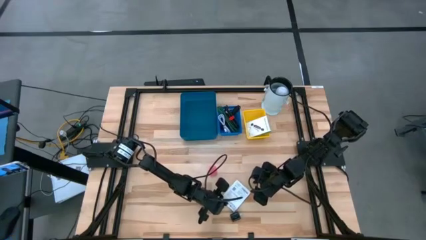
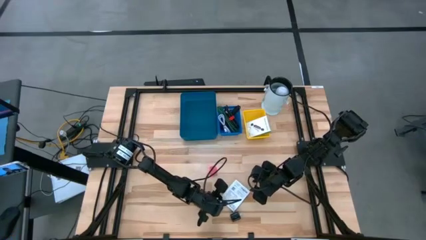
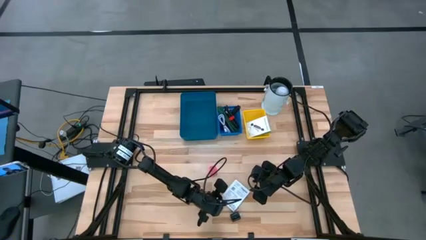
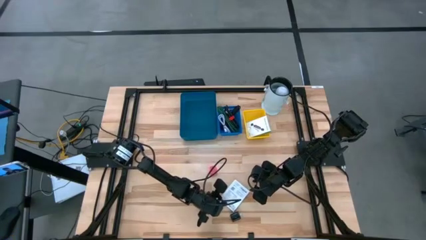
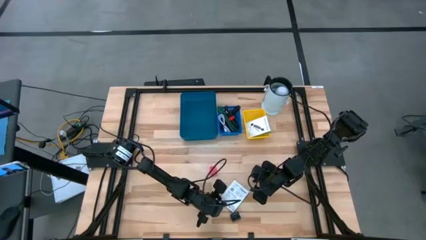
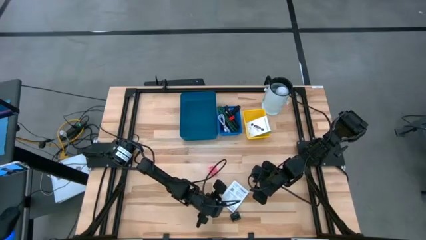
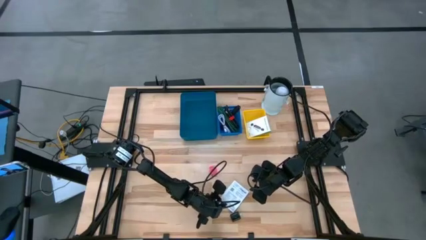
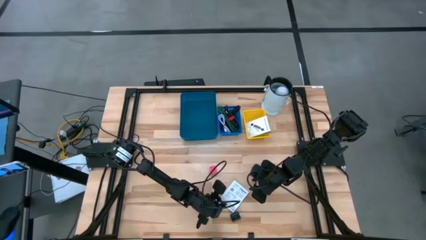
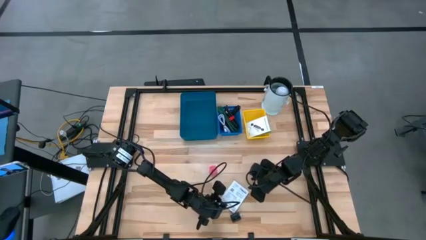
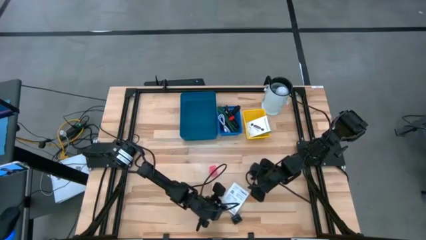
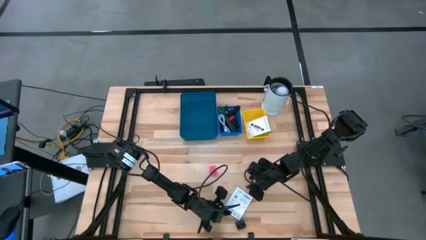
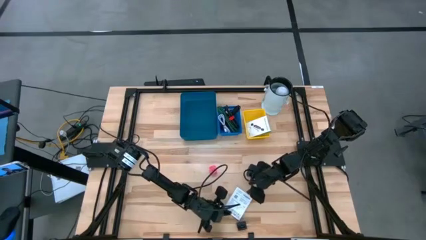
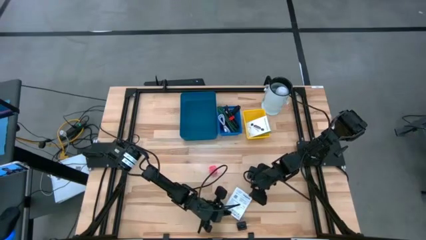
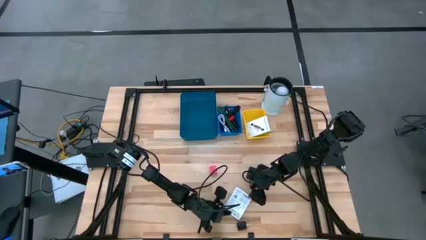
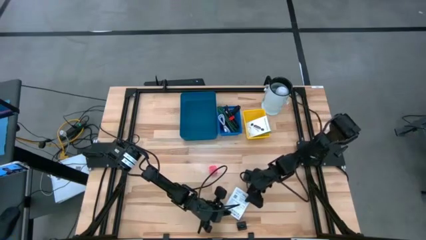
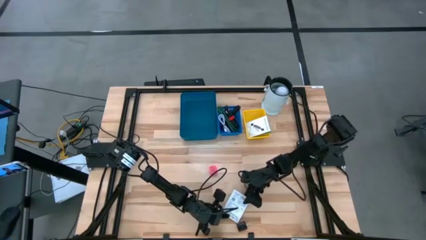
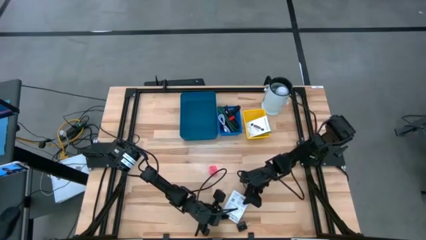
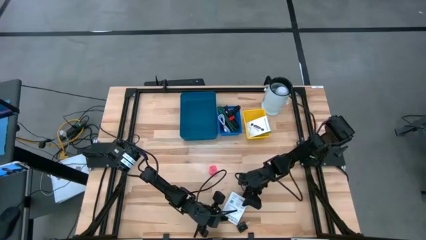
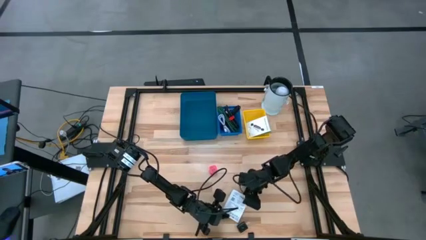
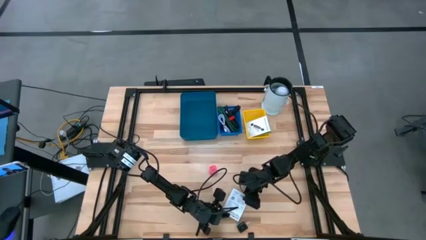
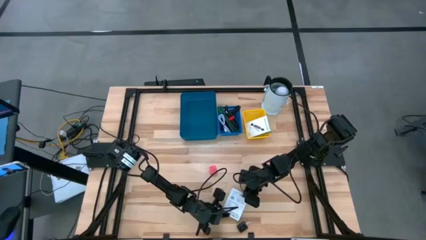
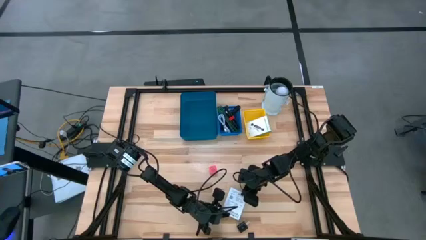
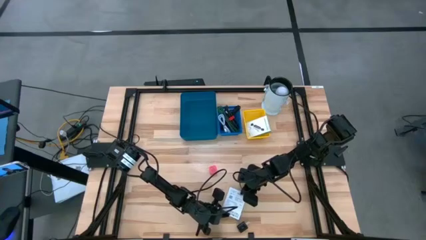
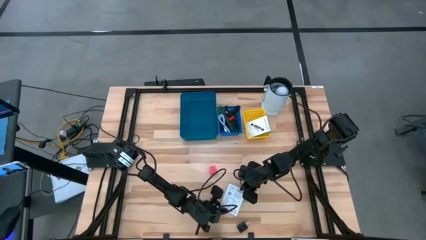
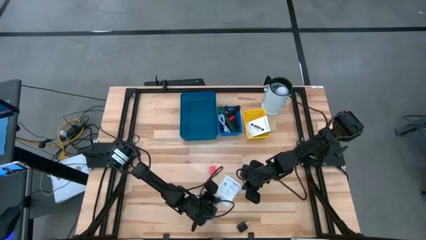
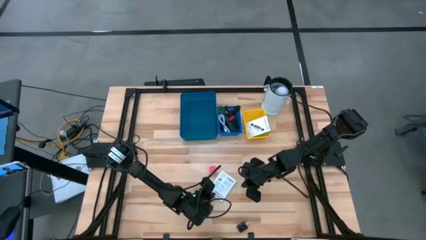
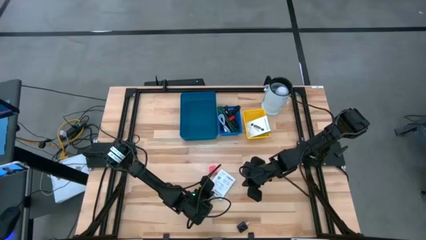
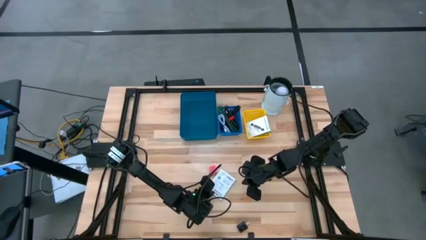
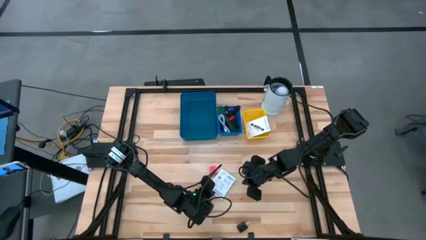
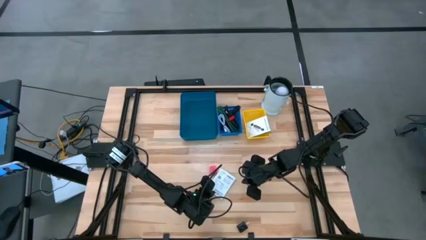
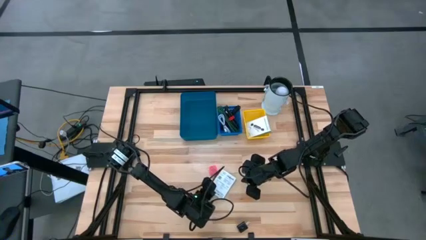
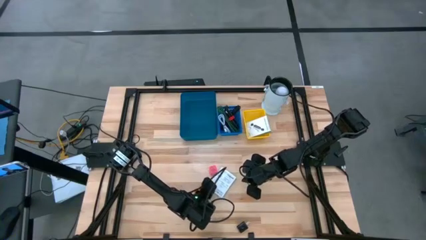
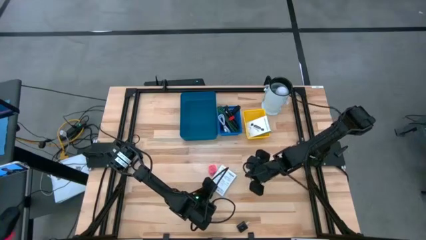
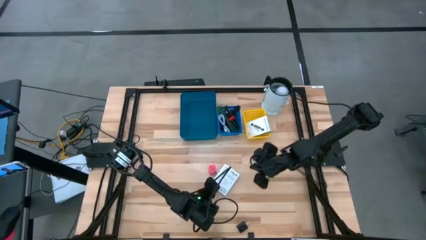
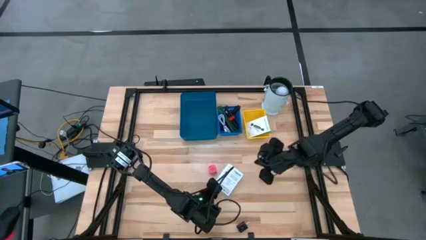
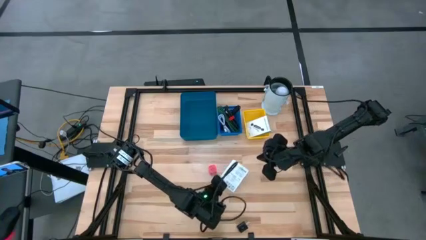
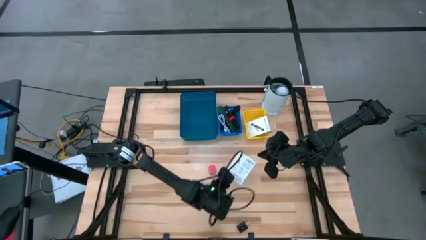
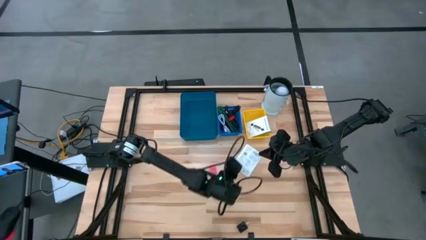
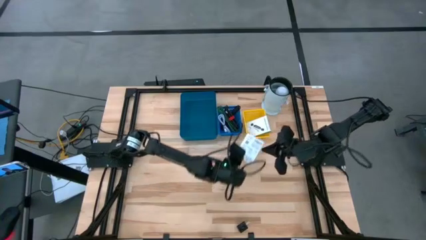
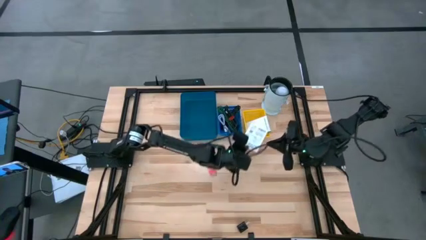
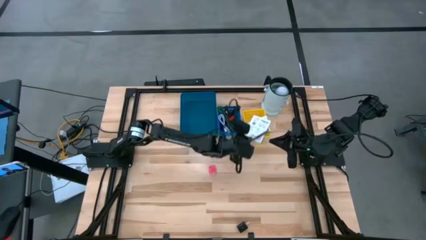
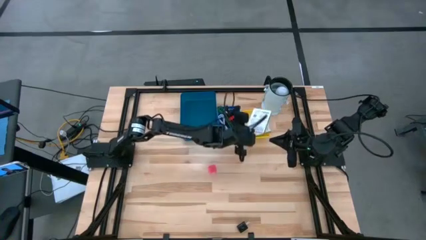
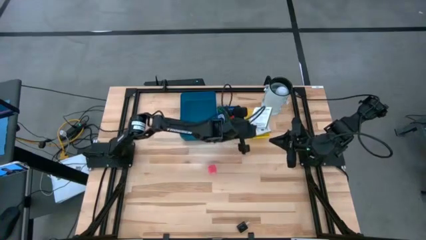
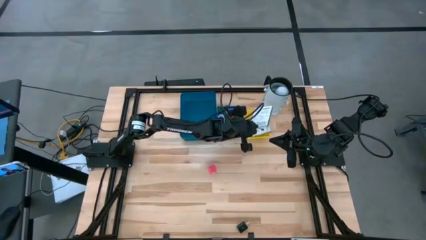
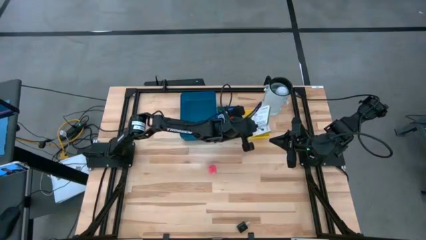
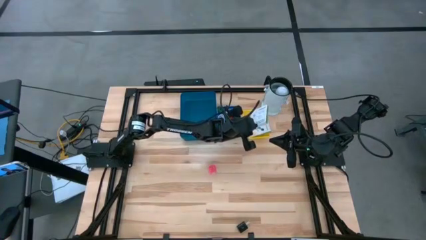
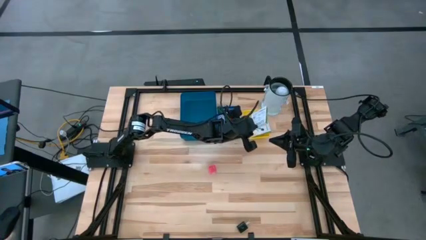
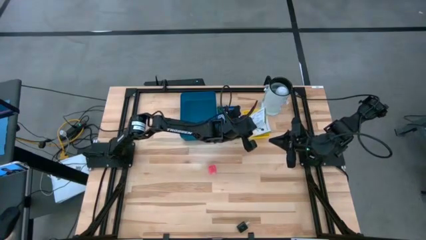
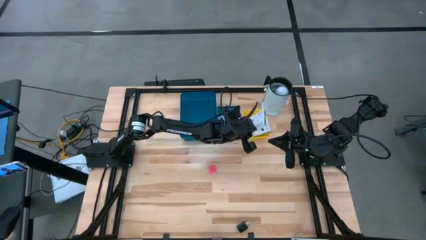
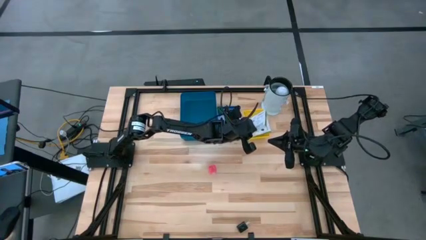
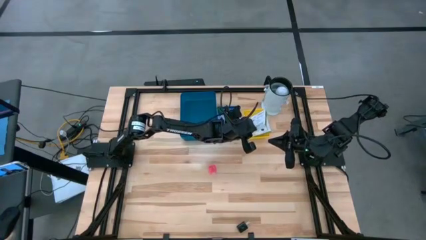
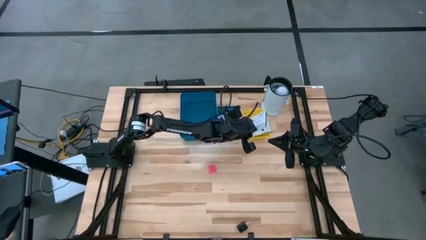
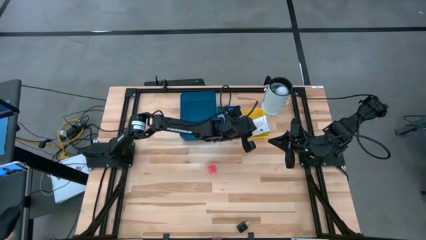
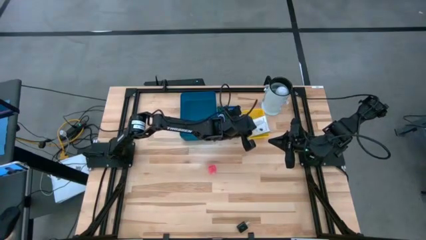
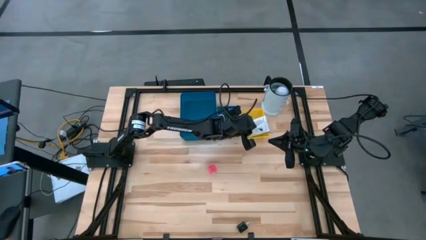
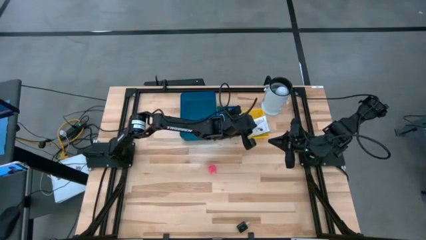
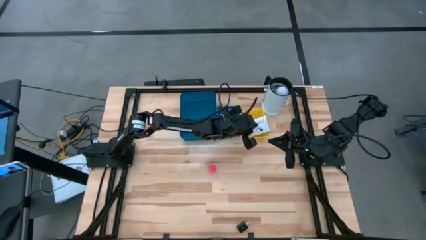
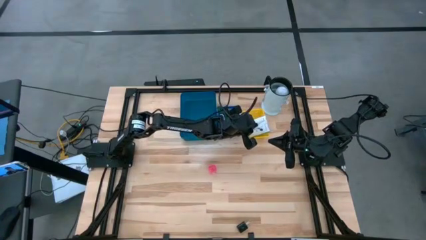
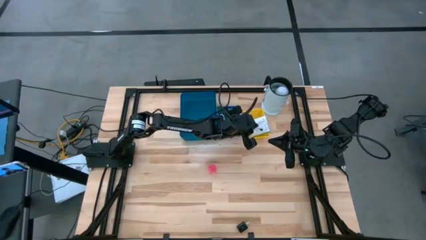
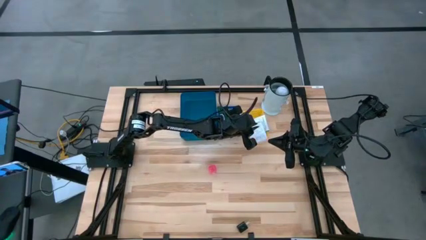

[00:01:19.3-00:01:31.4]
Task: Pick and place items into bin
Put the card reader box into the yellow basket

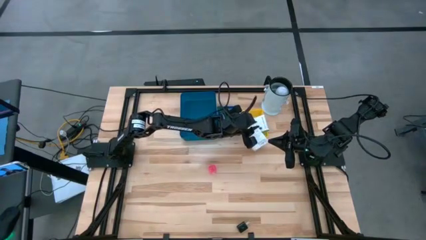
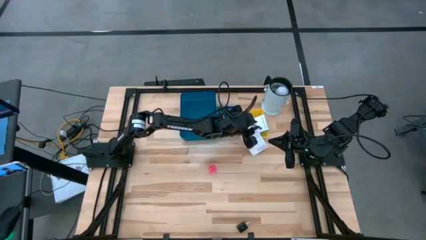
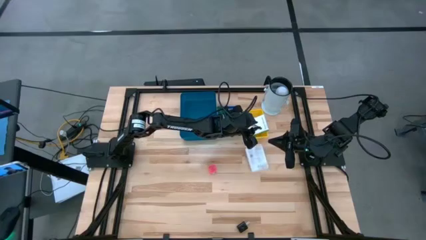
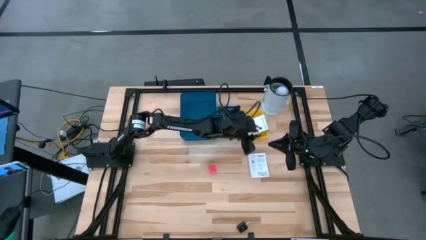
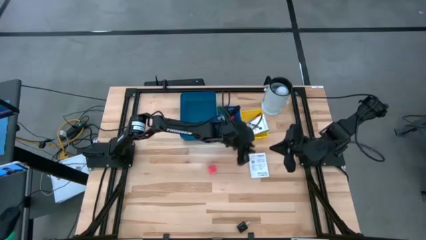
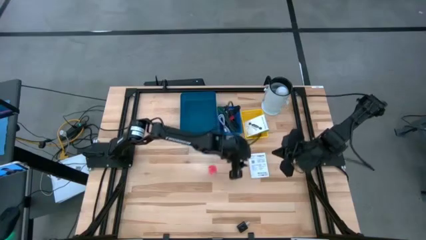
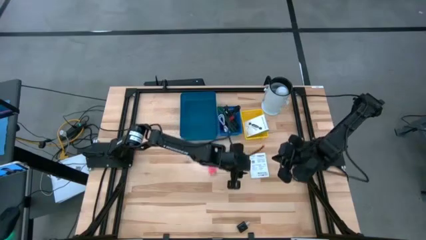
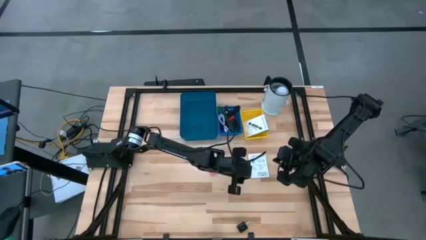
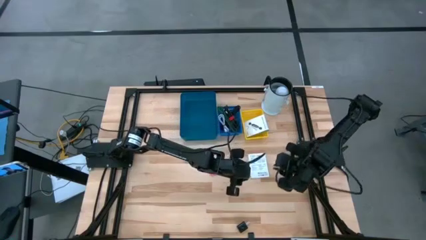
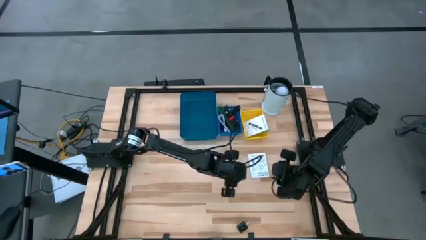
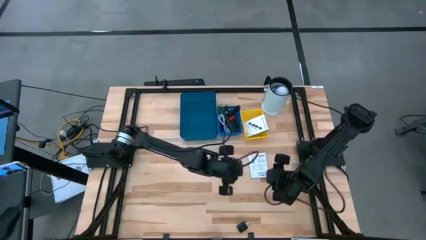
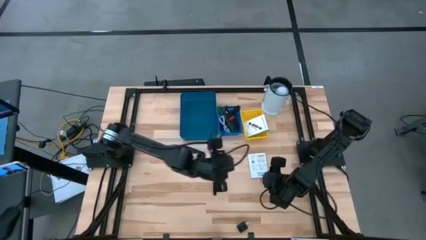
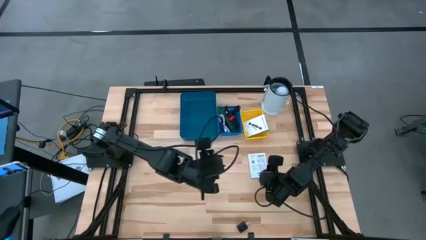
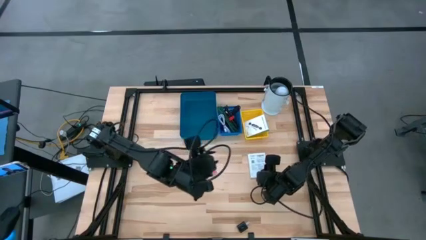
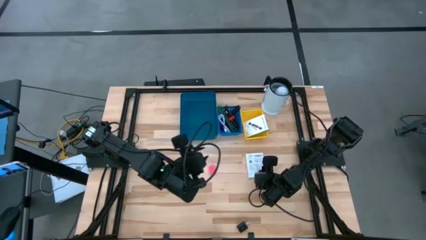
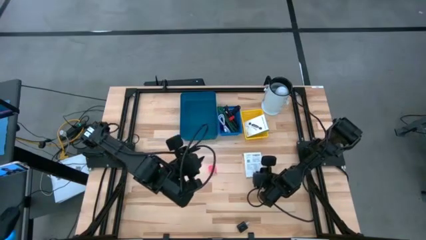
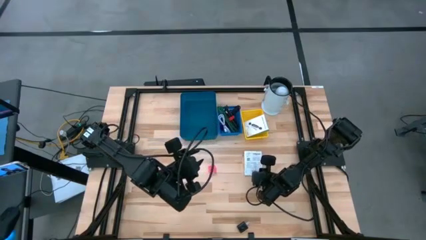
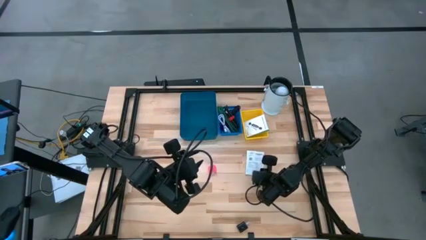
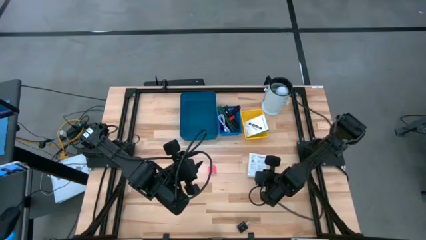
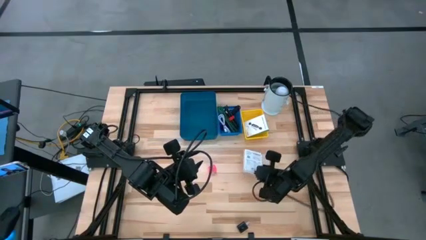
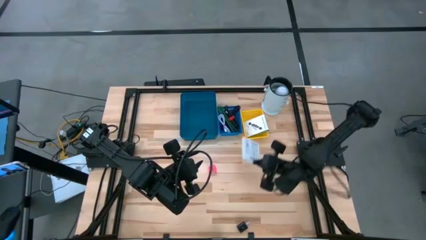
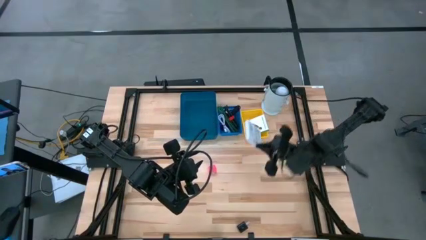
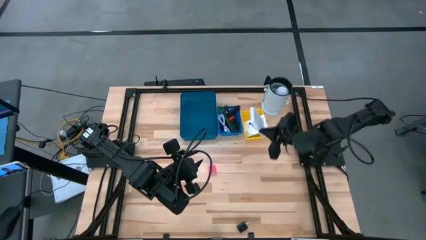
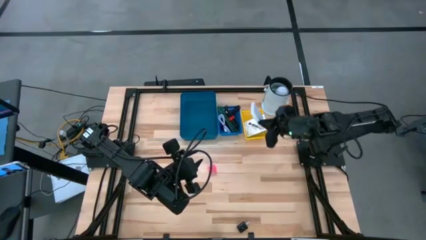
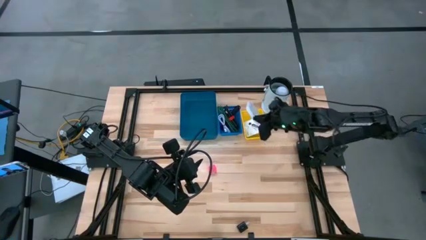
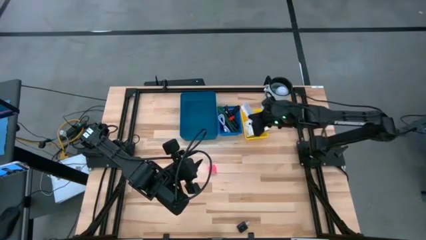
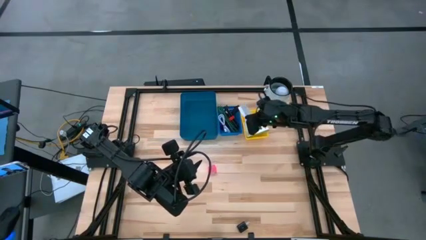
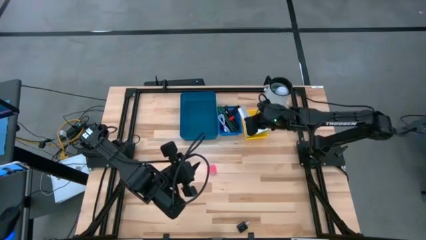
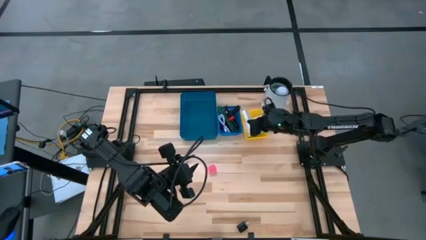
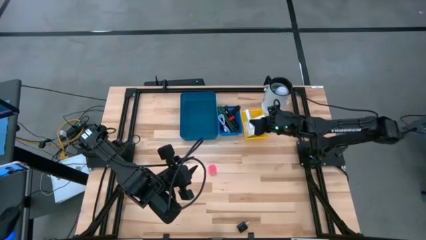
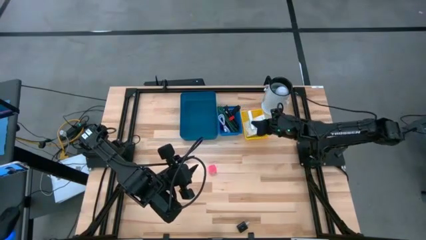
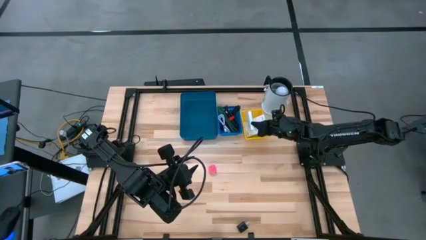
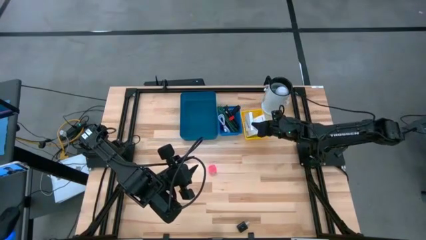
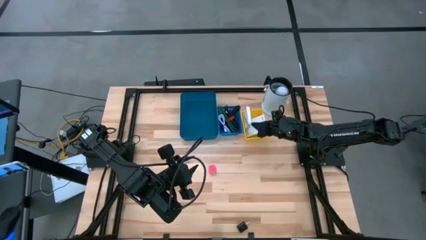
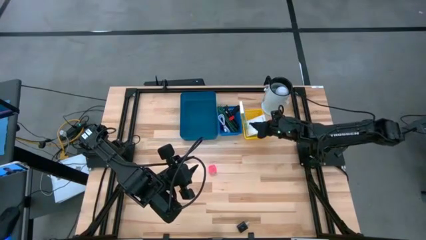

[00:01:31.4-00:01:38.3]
Put the card reader box into the yellow basket
